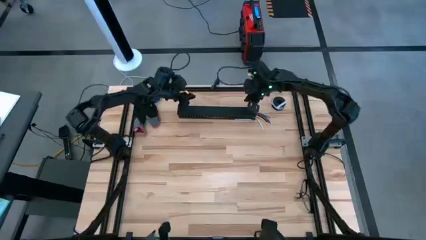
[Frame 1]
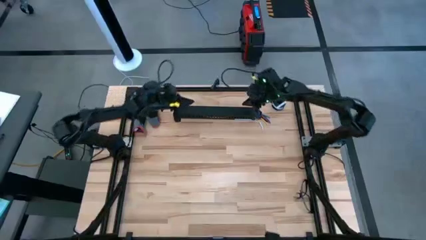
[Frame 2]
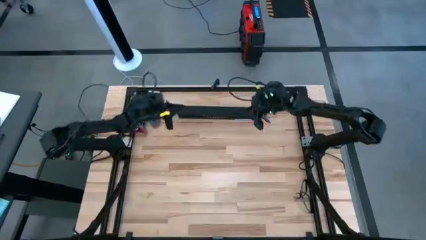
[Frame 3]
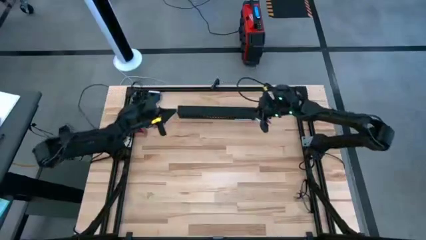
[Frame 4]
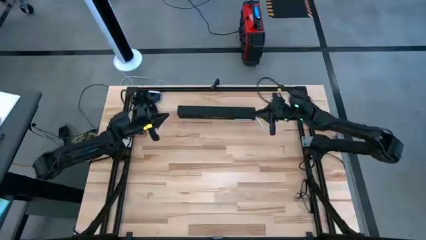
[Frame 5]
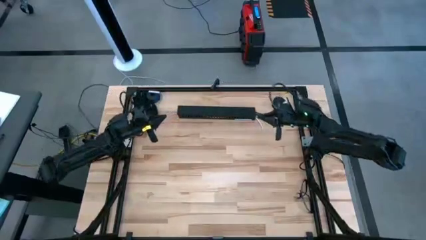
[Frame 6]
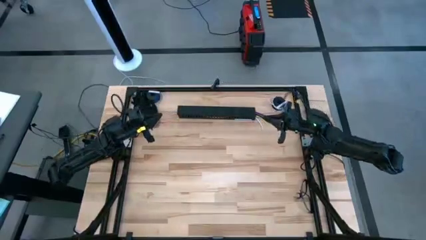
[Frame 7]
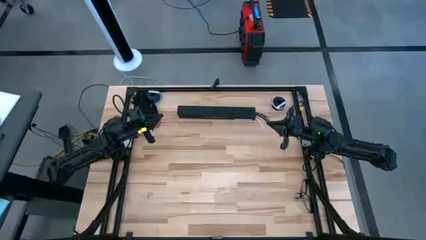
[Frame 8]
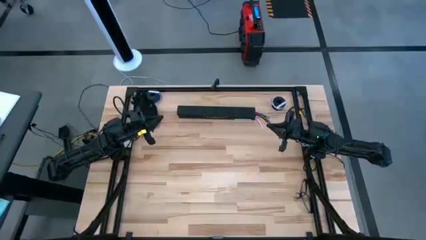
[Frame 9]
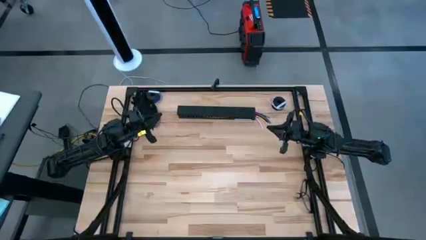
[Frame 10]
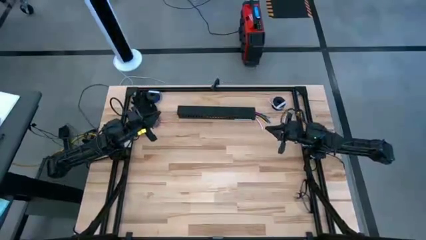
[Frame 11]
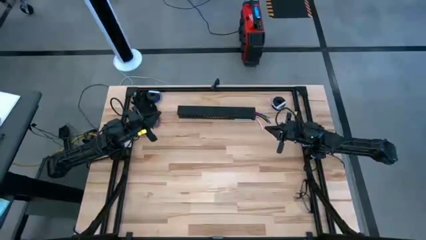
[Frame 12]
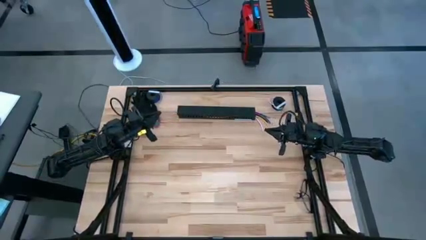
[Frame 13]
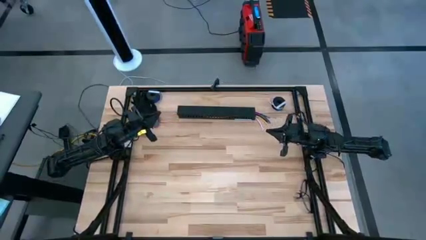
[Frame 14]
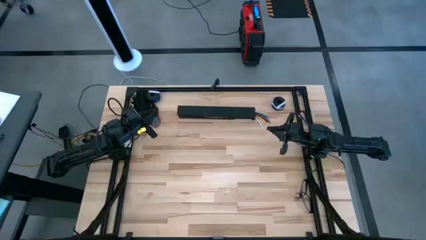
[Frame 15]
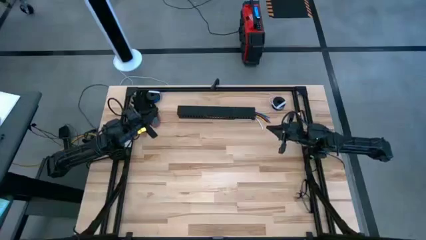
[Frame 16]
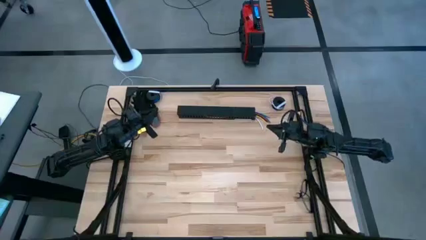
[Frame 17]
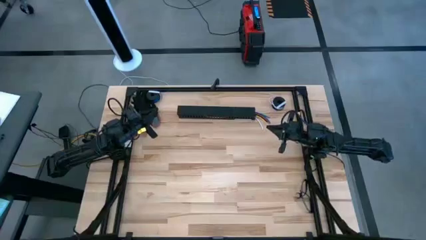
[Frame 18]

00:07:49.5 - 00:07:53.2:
Task: Ziptie cables
Return to Home Position

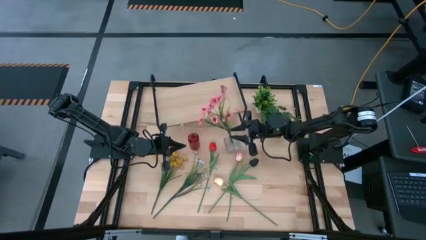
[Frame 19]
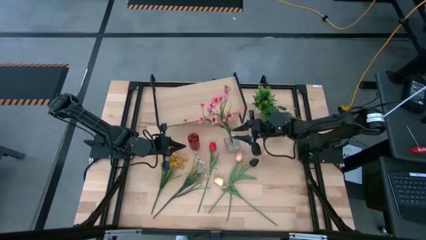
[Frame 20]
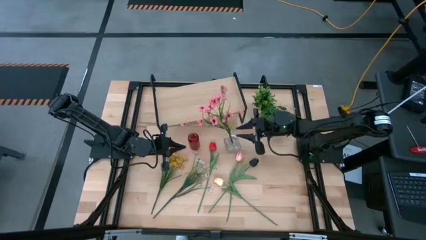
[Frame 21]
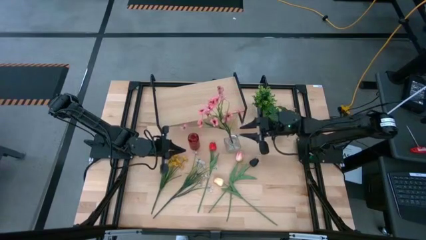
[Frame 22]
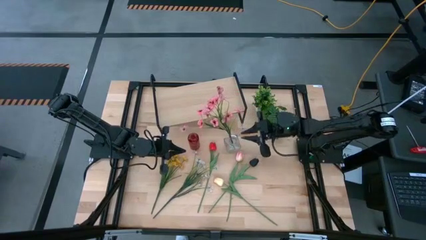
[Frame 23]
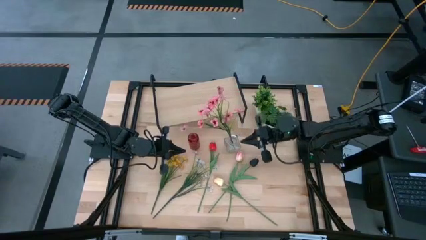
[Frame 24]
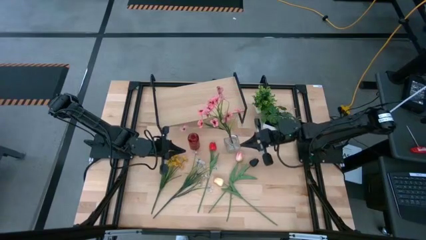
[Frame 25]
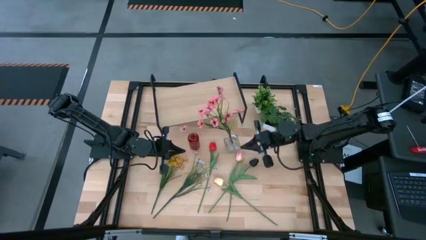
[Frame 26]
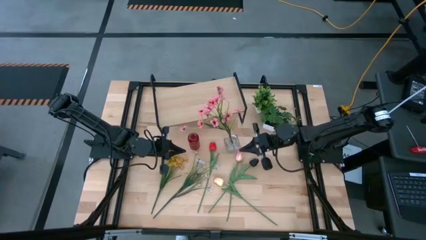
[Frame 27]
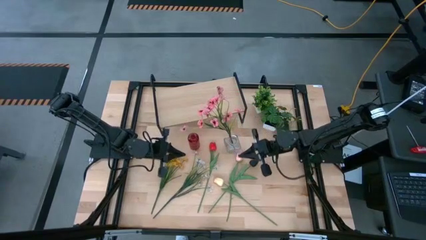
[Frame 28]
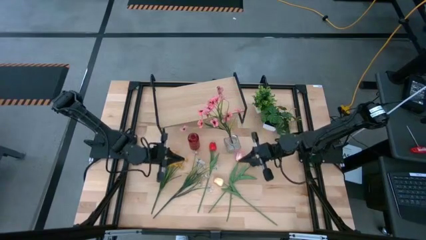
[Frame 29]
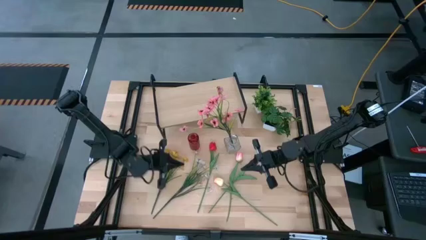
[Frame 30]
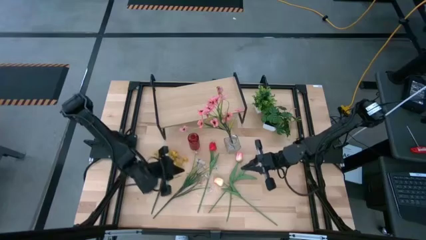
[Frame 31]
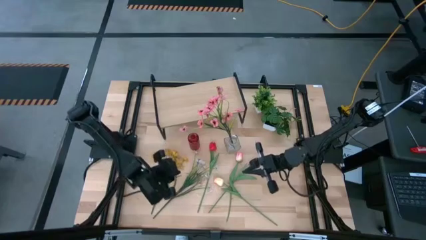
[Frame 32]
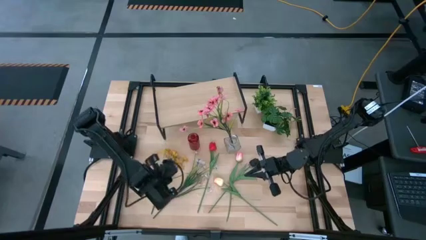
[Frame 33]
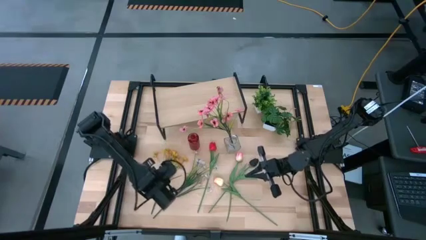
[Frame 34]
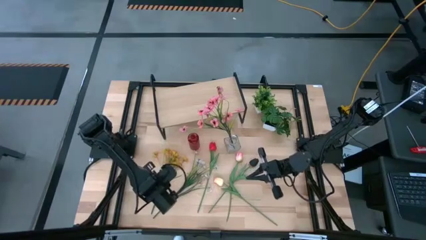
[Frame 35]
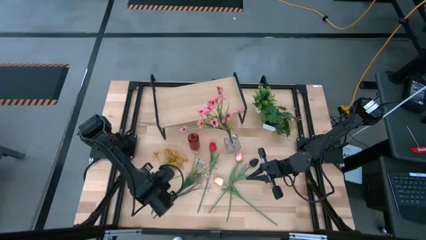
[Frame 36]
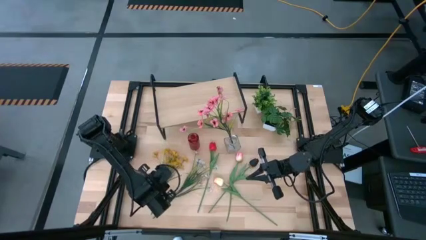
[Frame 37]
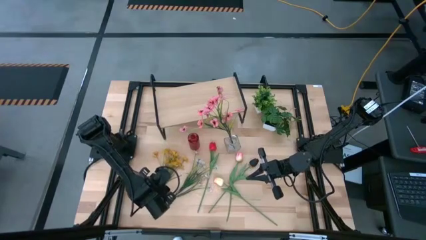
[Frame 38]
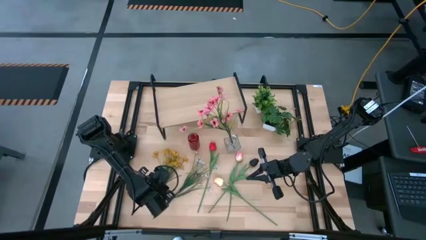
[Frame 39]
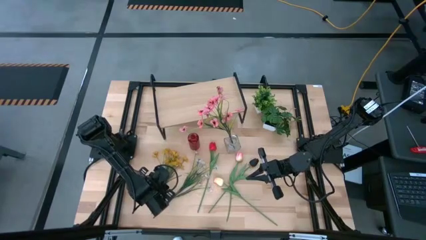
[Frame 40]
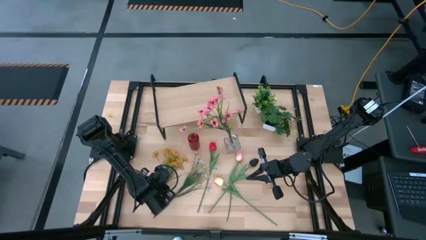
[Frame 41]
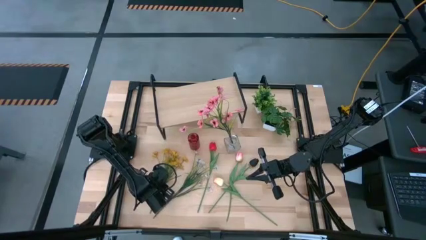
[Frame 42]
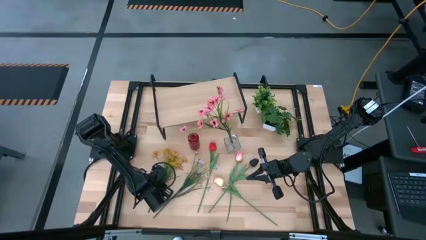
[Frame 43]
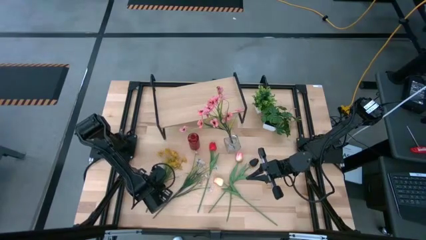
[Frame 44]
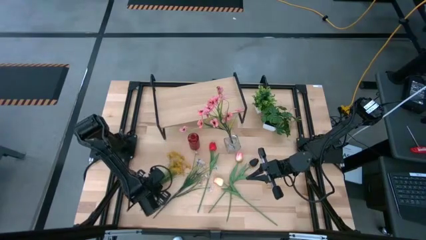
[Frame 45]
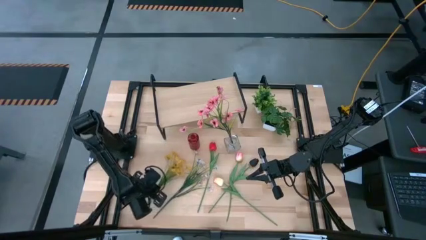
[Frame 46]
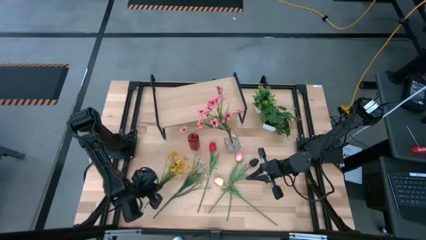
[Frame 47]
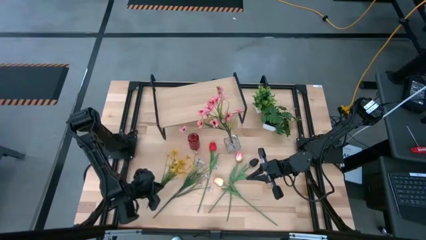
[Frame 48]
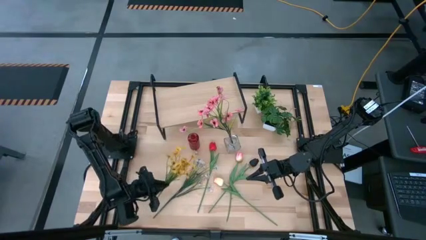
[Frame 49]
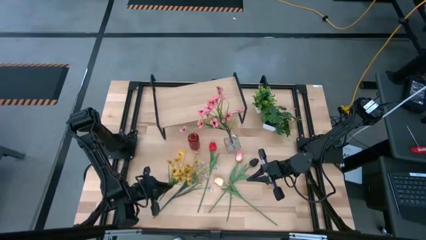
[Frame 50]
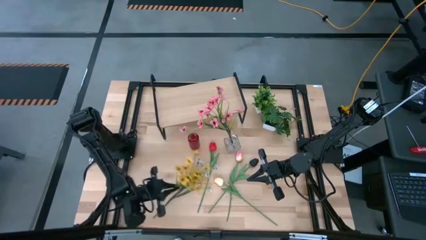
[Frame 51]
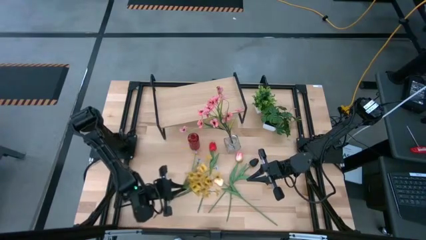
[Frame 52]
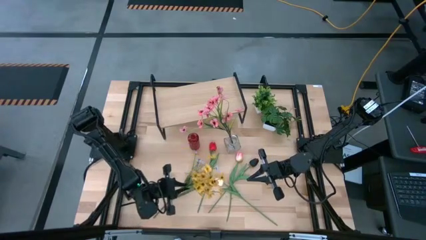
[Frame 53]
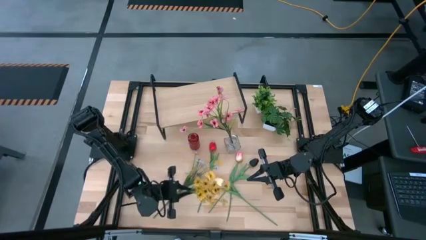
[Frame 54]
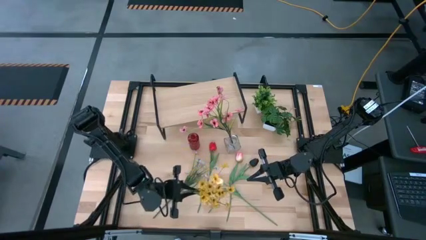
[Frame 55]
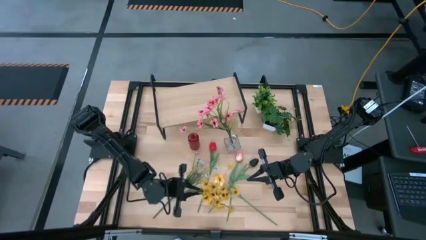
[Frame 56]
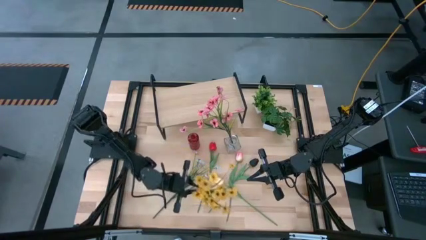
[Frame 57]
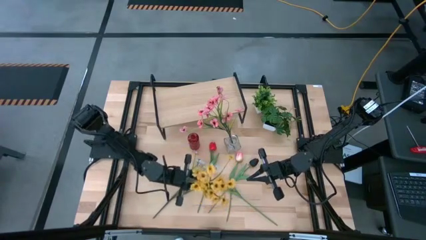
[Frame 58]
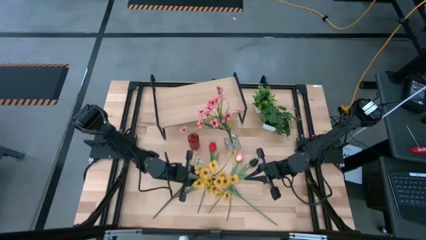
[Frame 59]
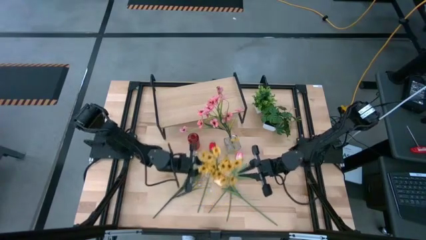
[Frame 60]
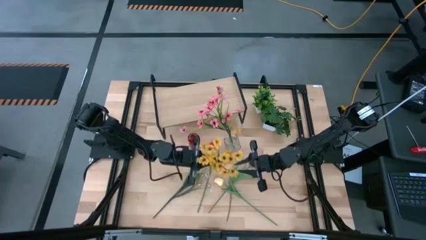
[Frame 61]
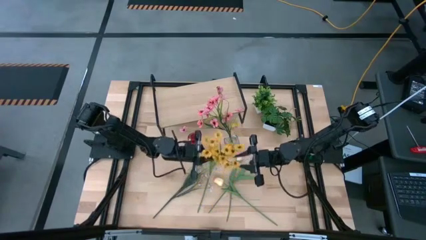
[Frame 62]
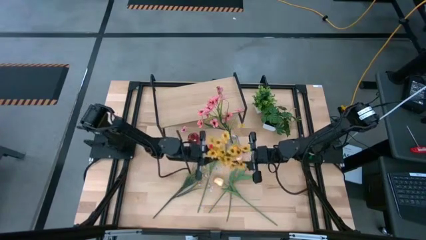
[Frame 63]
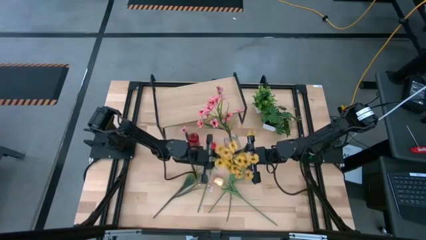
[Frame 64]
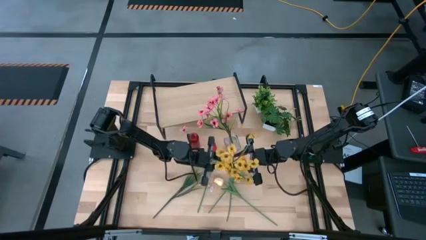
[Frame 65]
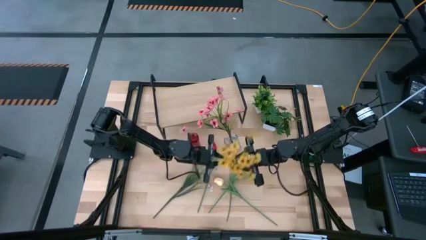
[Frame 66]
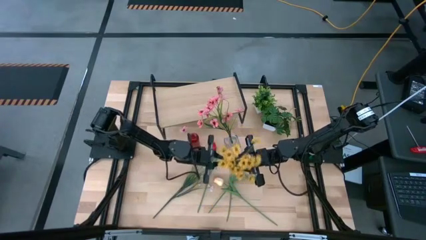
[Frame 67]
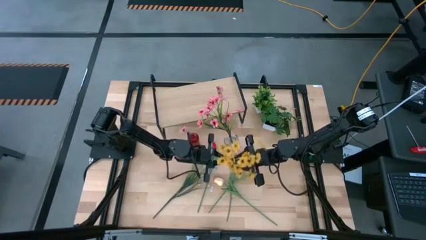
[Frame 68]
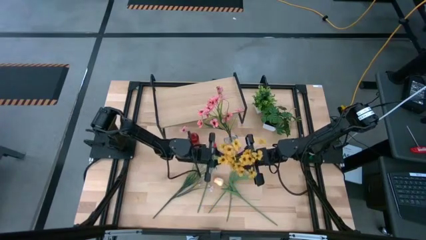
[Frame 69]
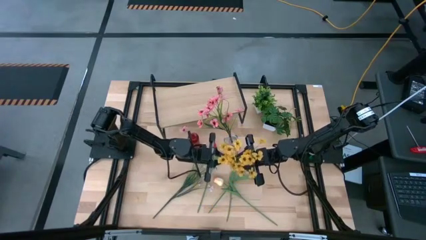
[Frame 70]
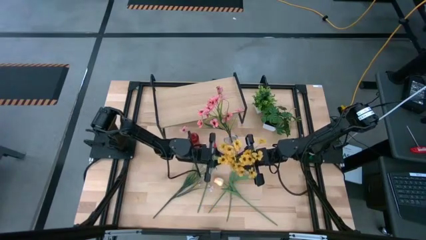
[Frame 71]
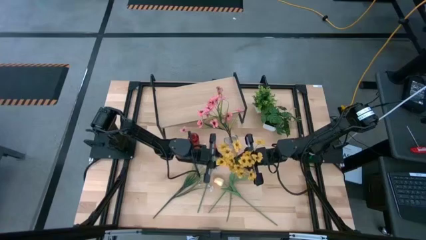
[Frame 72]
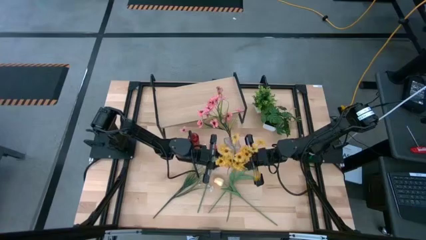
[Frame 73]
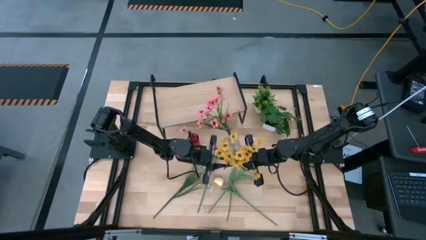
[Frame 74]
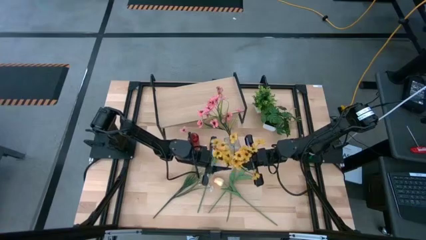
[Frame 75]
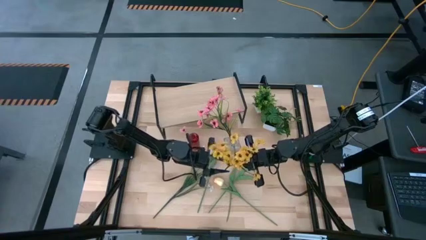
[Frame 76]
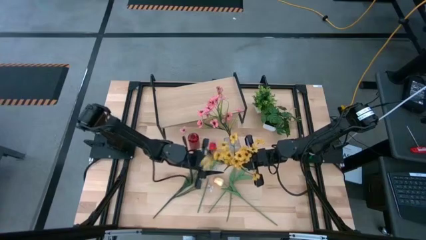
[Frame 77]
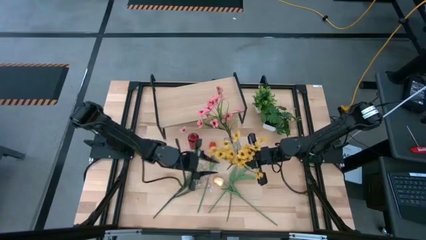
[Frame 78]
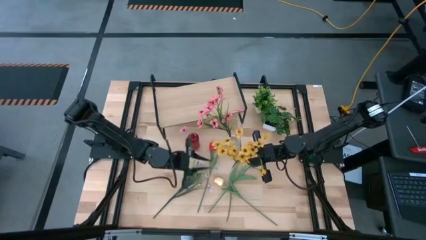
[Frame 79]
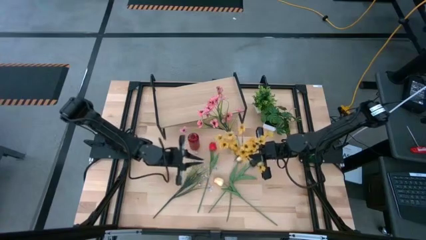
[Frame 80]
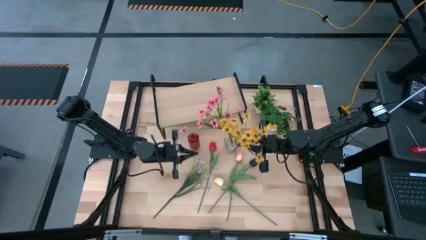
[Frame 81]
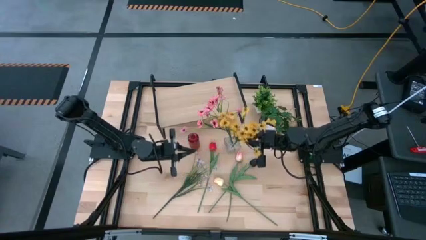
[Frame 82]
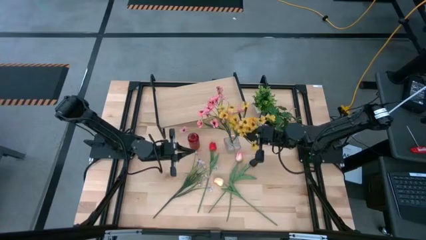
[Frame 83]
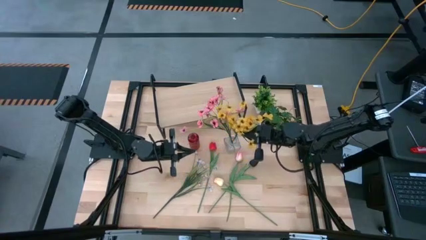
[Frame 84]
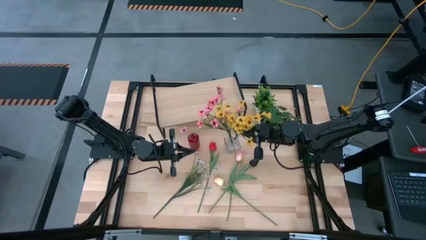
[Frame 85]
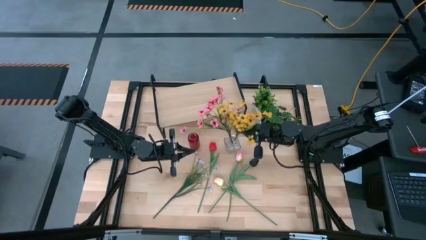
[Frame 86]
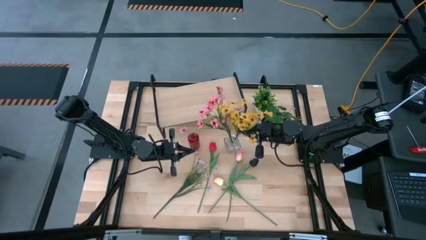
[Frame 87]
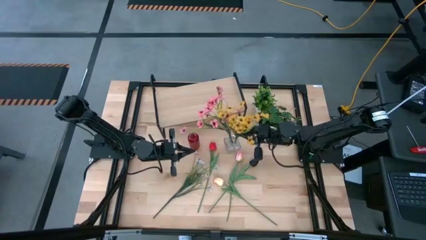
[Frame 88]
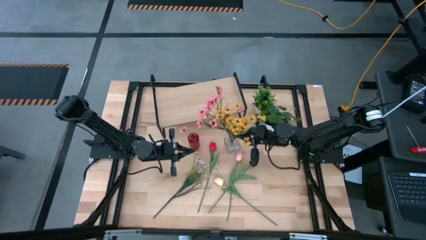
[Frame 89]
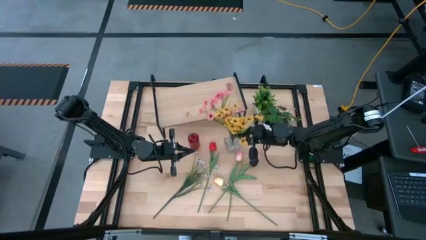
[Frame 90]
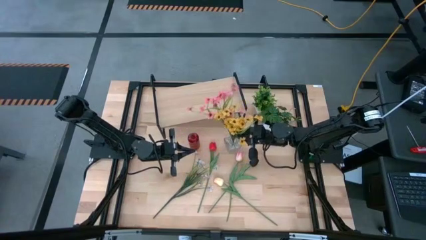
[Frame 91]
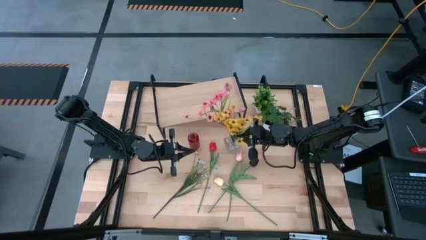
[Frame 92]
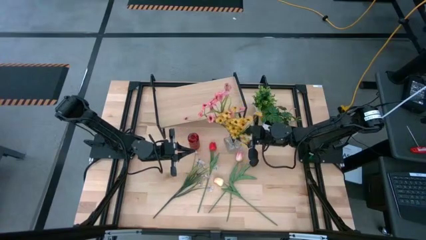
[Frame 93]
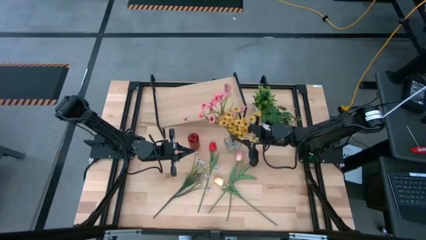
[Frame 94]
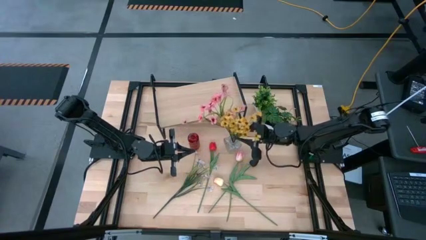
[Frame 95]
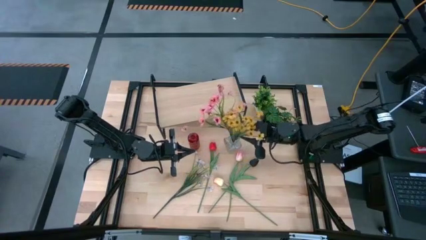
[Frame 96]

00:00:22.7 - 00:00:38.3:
Task: Pick and place flowers into a vace then onto a shelf
Put the yellow flowers into the transparent flower vase
